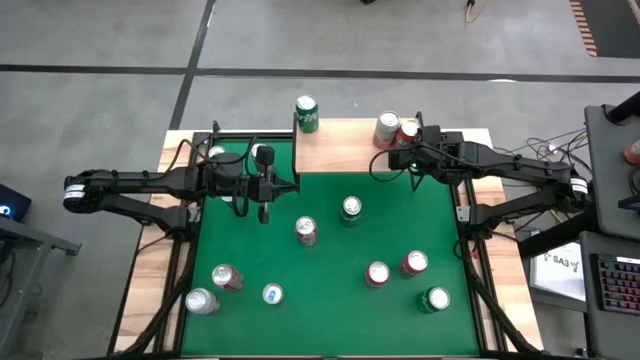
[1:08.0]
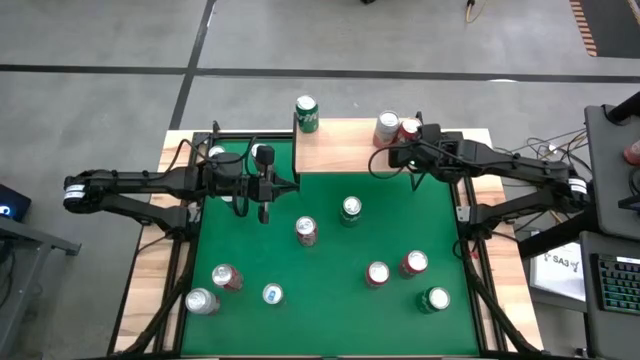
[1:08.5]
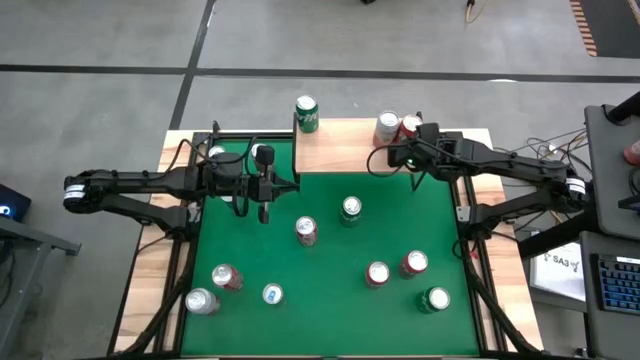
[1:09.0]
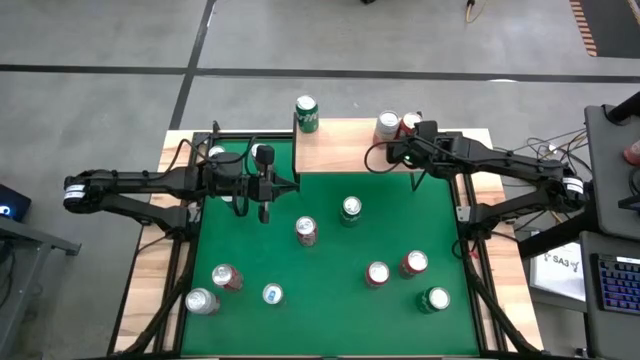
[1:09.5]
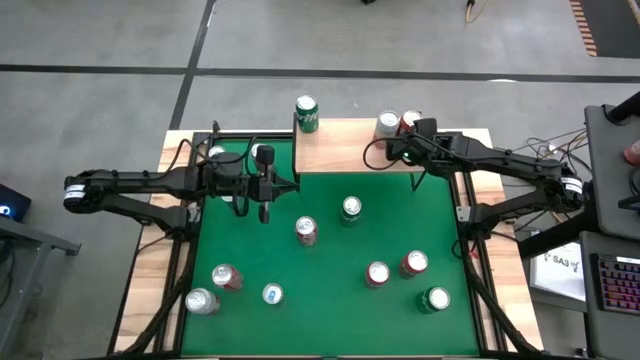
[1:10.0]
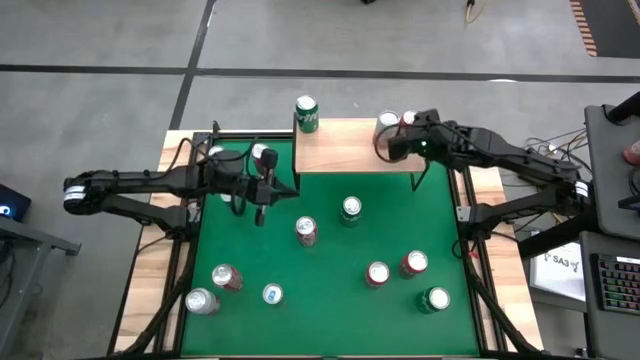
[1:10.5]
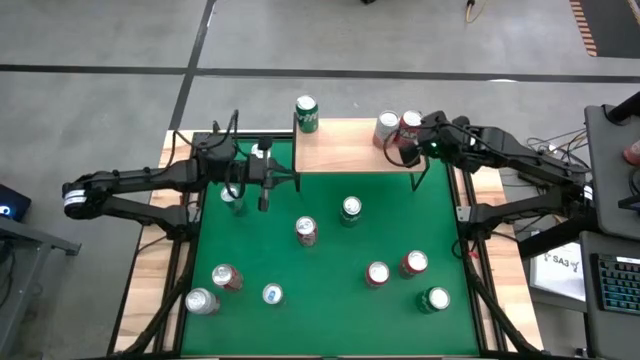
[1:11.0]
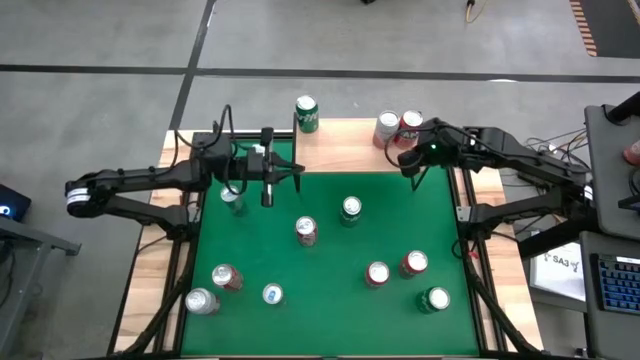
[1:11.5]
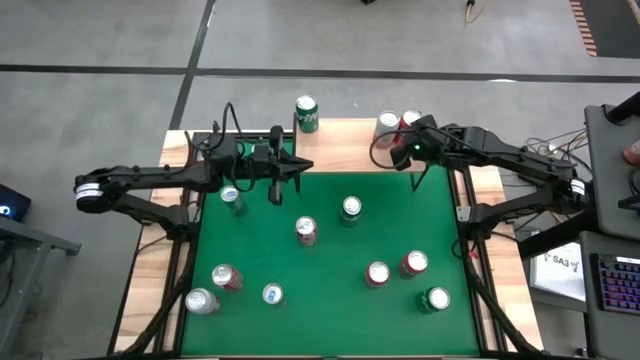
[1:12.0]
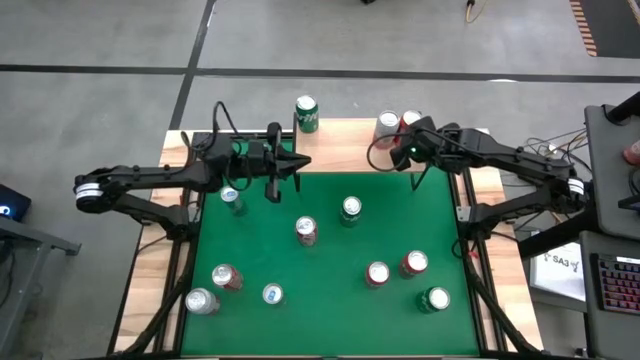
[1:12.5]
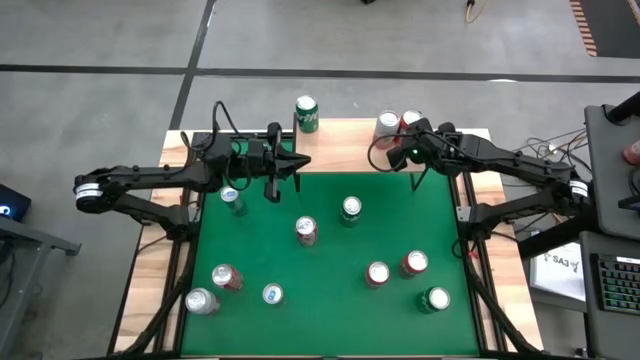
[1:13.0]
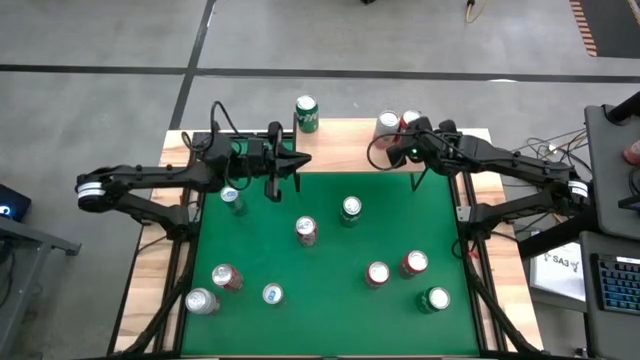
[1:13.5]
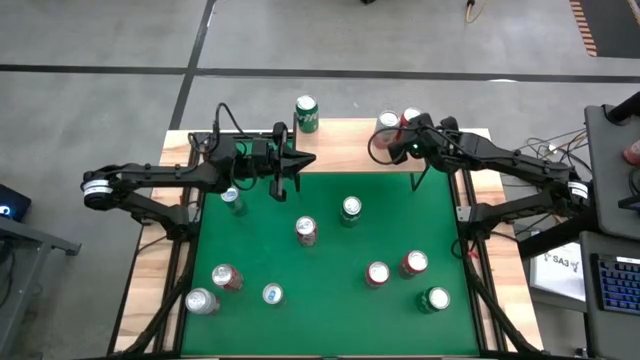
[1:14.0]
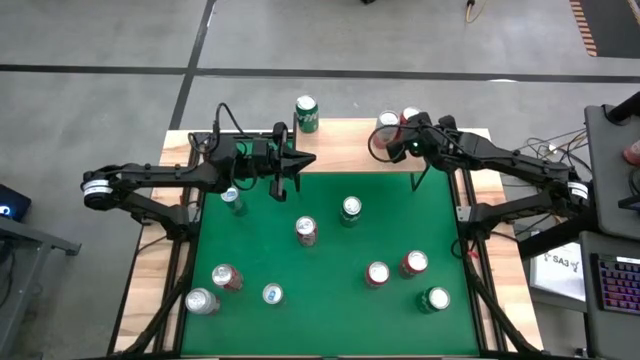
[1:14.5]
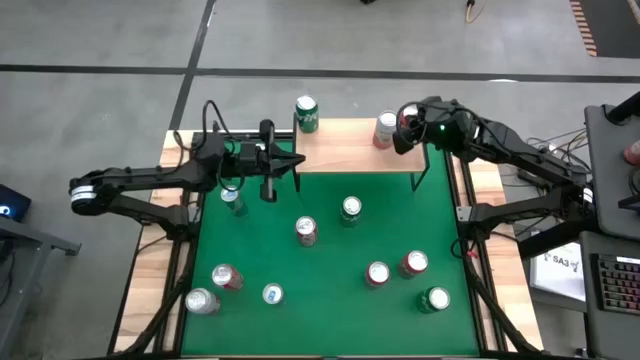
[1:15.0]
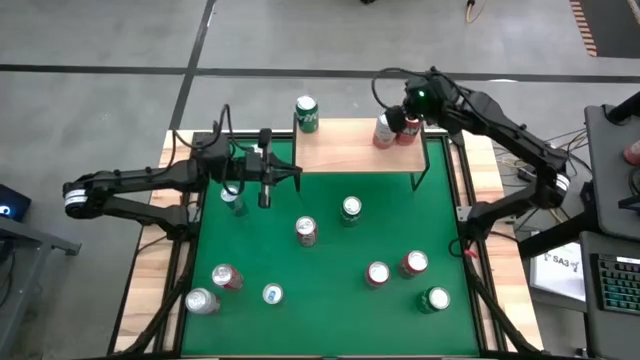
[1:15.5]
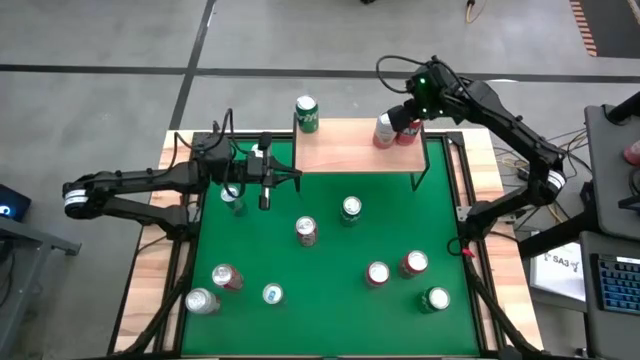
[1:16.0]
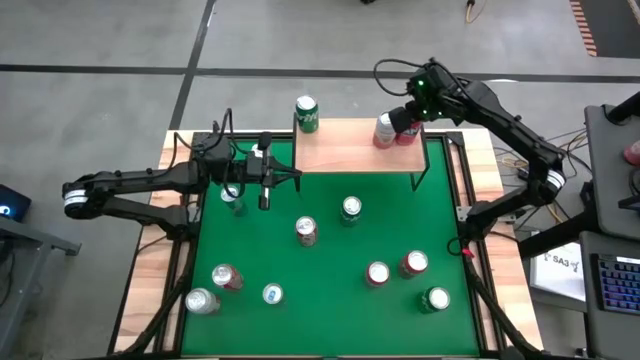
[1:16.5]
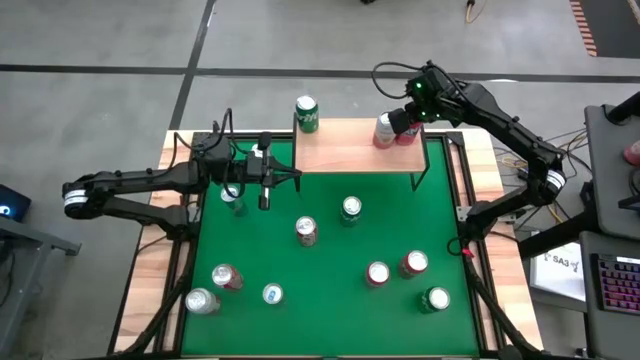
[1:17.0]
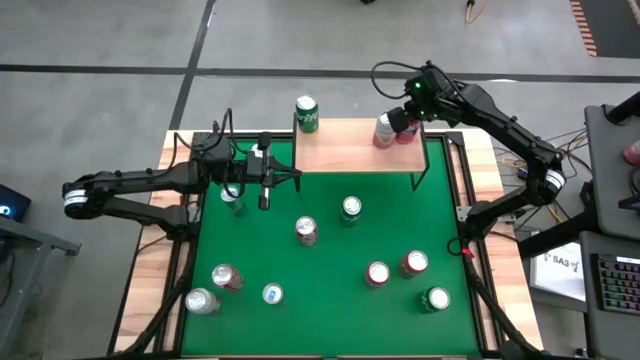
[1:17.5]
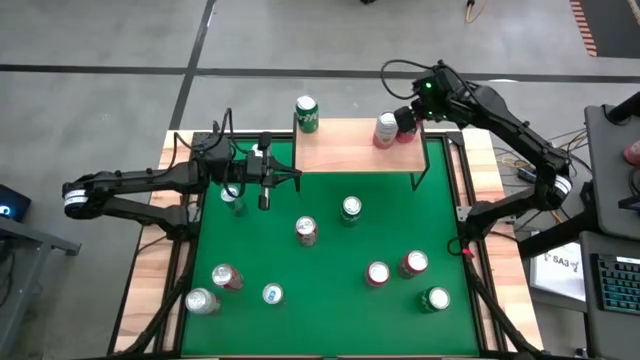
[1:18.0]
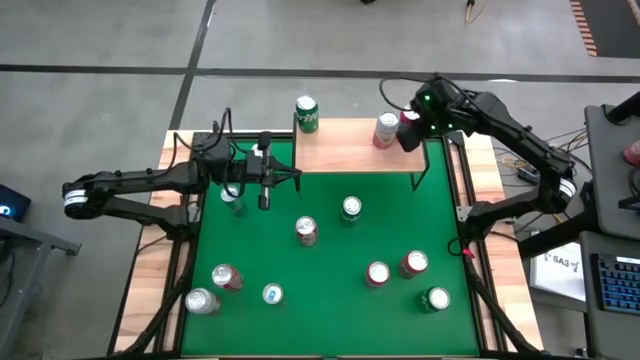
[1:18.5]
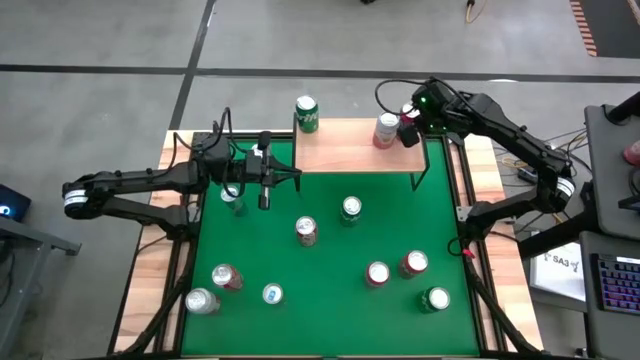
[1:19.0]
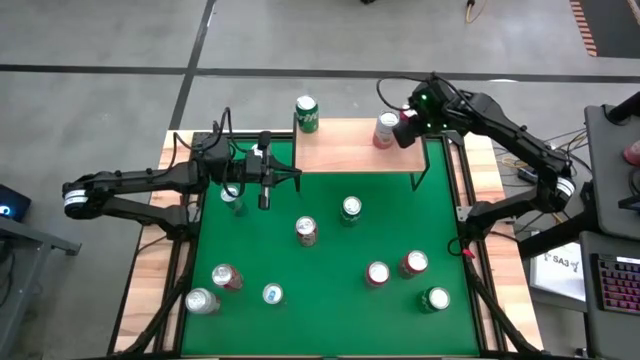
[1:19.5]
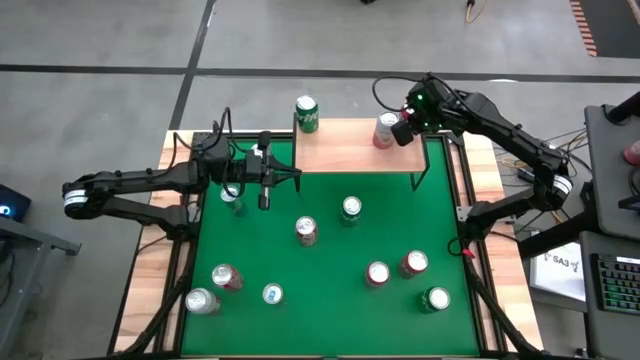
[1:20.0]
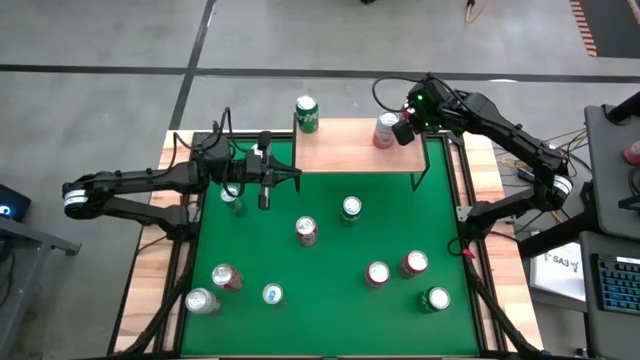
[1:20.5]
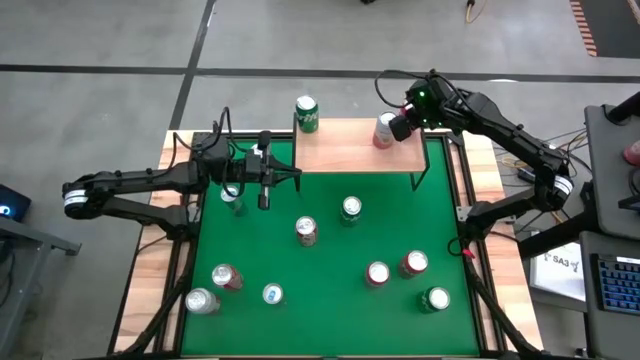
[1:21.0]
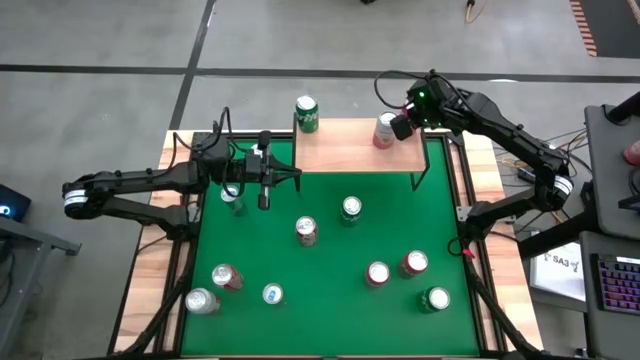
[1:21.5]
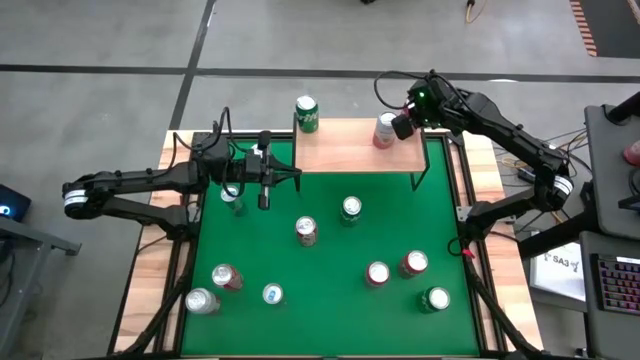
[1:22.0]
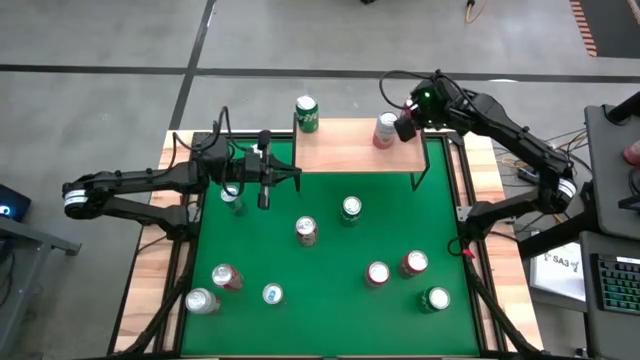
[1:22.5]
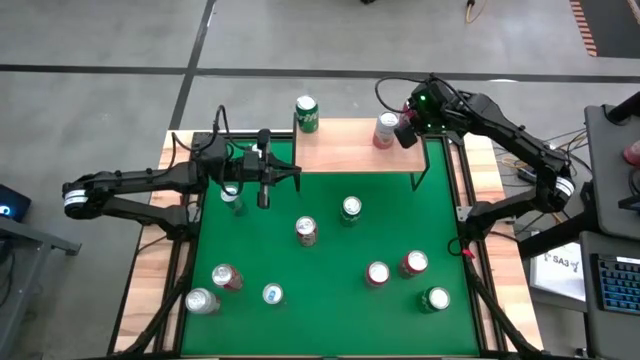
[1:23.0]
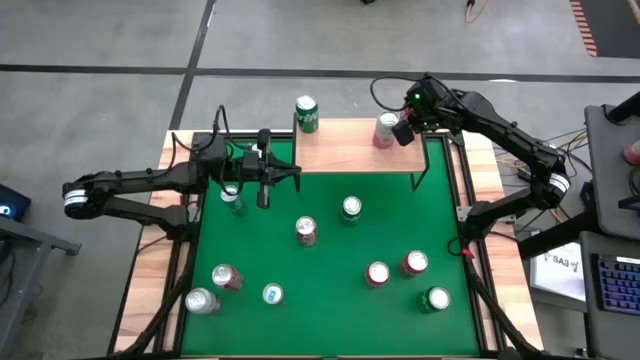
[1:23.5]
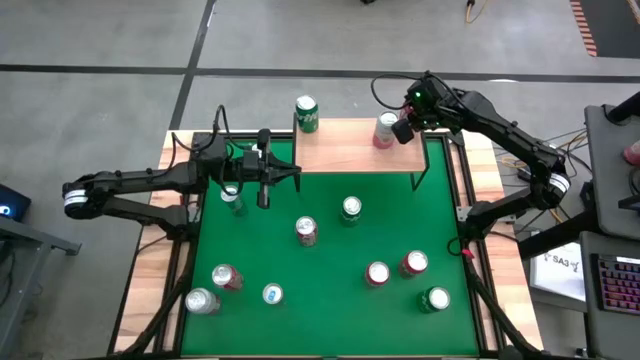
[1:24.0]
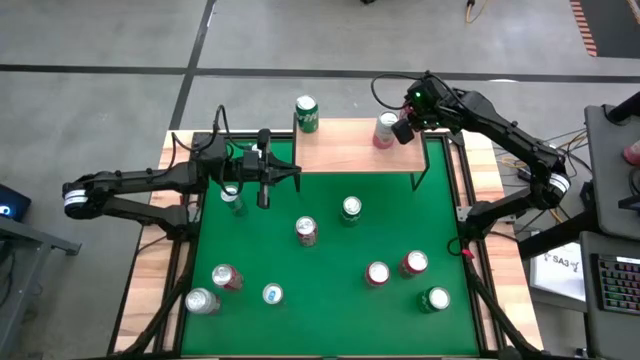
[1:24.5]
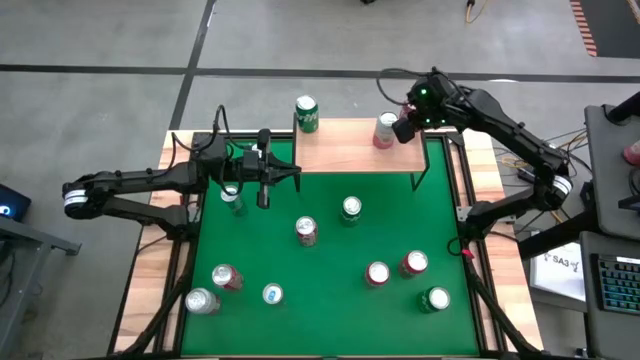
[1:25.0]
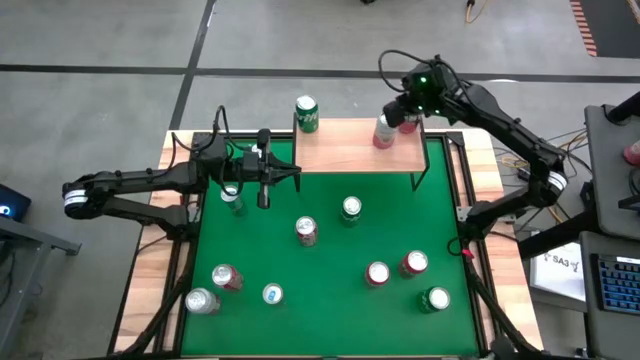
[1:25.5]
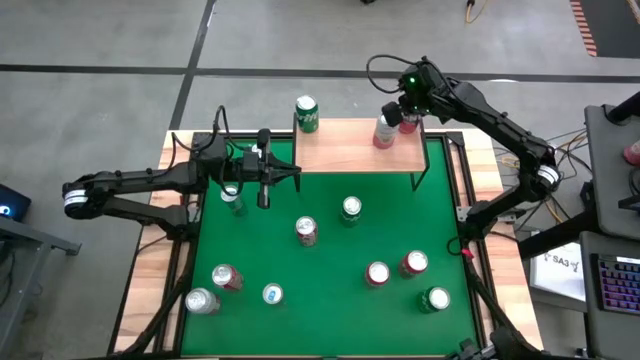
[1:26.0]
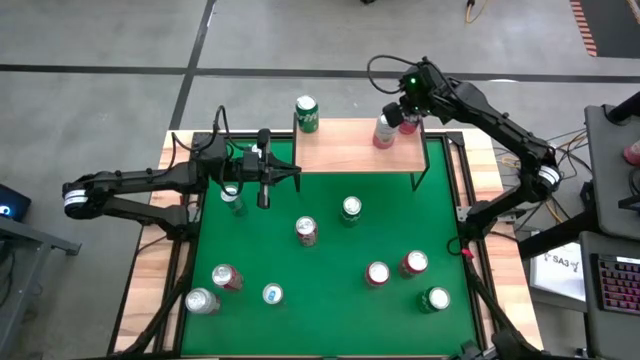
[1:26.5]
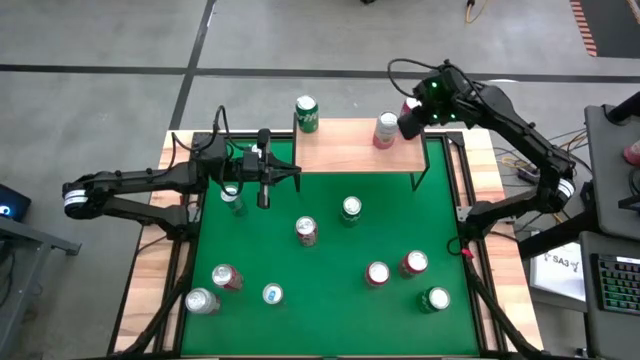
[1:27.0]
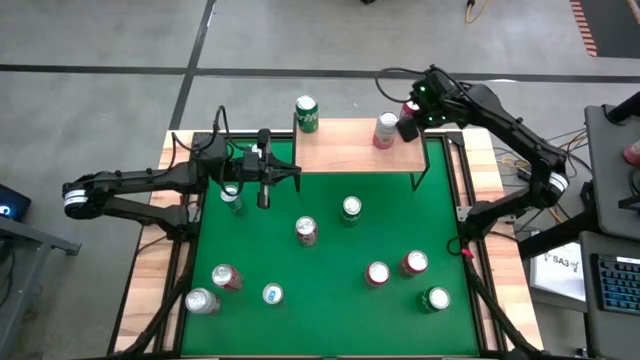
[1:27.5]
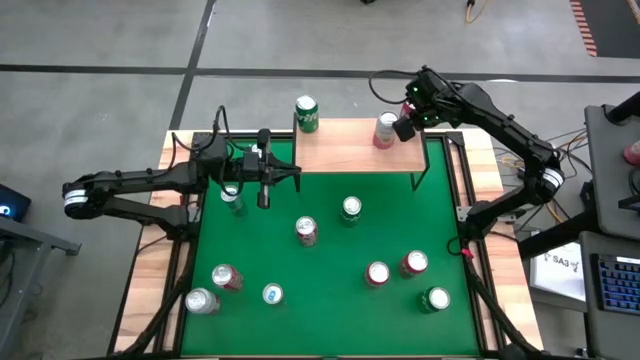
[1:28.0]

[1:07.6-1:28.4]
Task: Place canned beverage on shelf
Put the top red soda can on the shelf

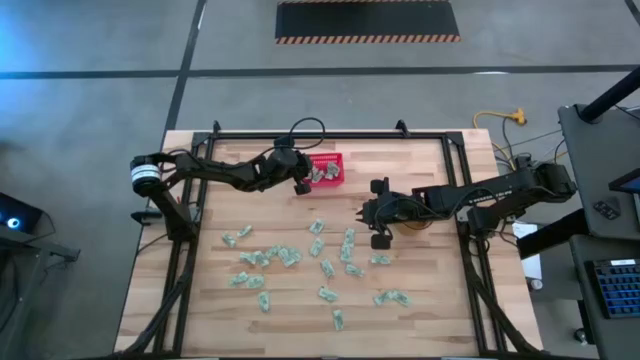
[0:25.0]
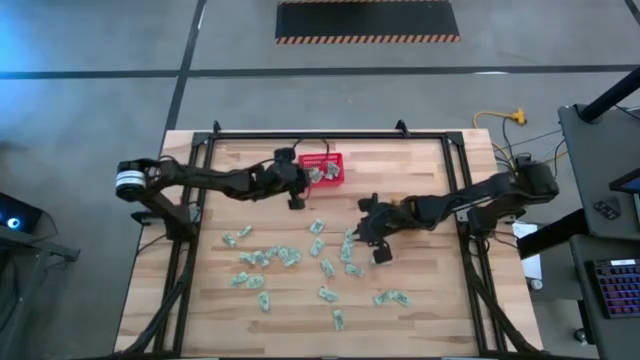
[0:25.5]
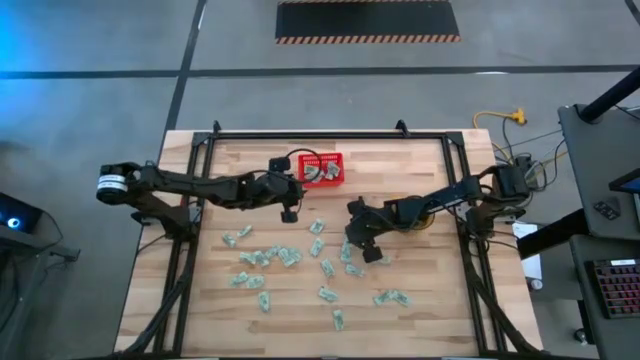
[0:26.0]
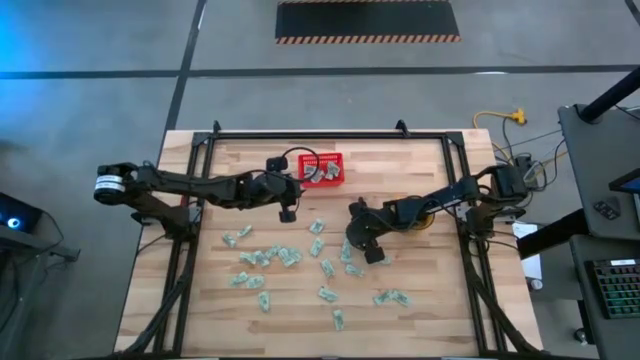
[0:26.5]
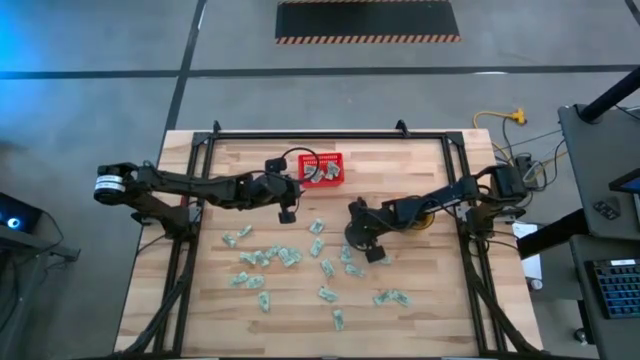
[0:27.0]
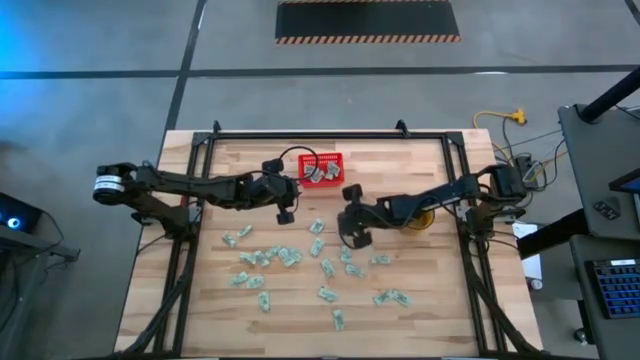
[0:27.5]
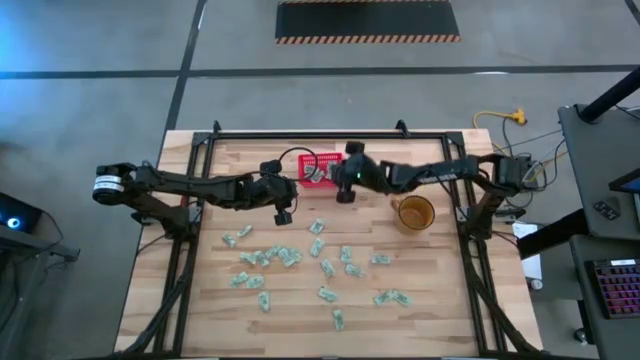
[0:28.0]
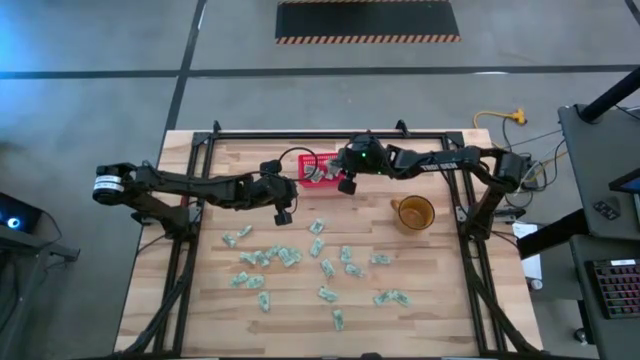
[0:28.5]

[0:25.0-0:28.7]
Task: Pick and place Stevia / Truvia into bins
Put the white stevia packet into the red bin
